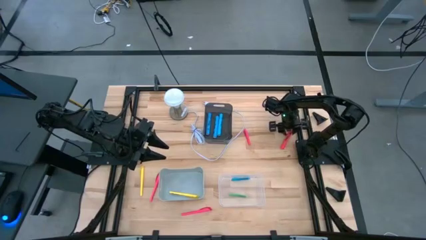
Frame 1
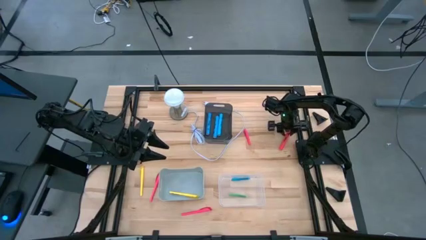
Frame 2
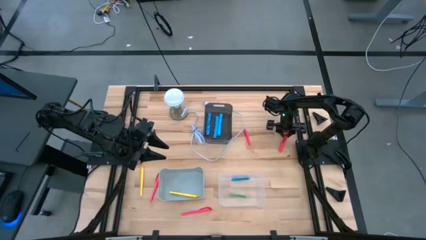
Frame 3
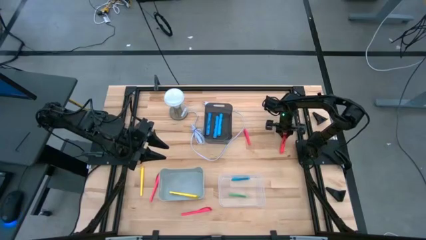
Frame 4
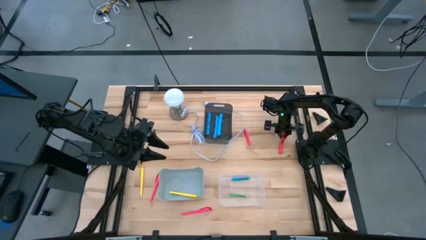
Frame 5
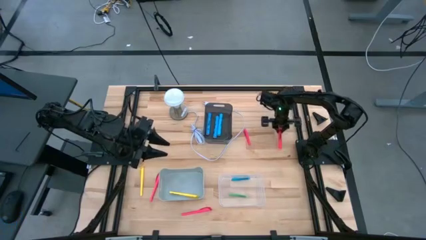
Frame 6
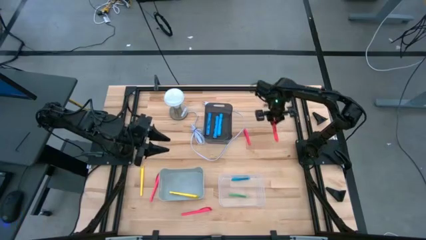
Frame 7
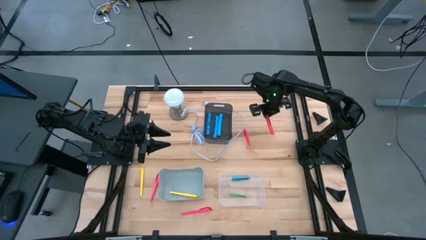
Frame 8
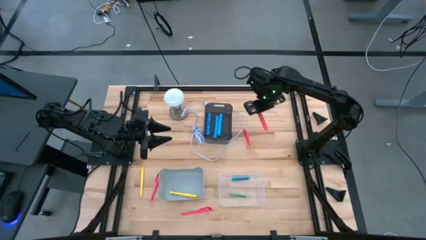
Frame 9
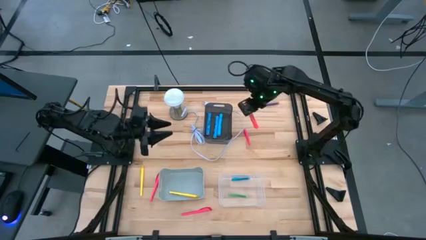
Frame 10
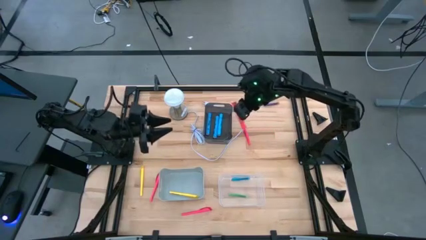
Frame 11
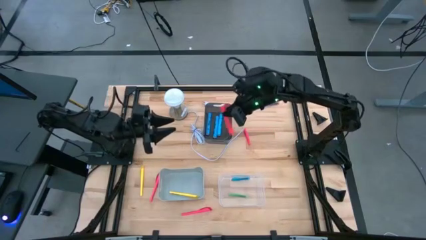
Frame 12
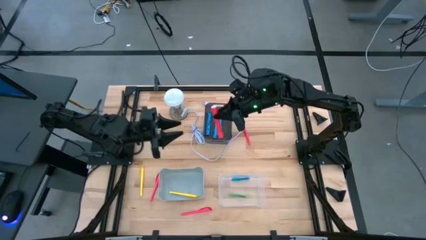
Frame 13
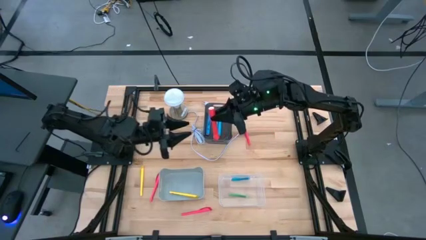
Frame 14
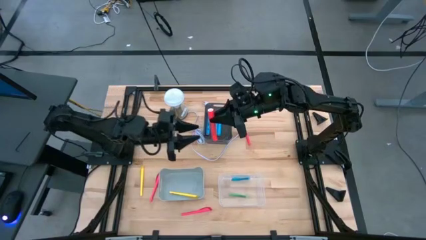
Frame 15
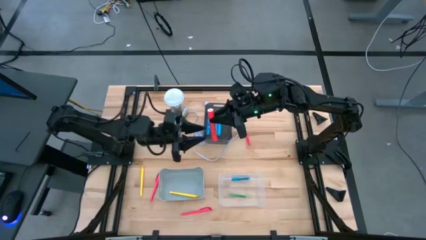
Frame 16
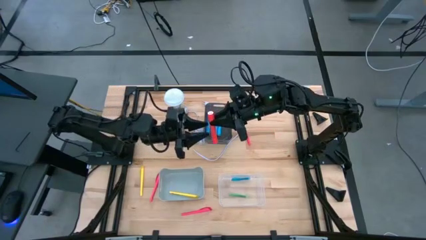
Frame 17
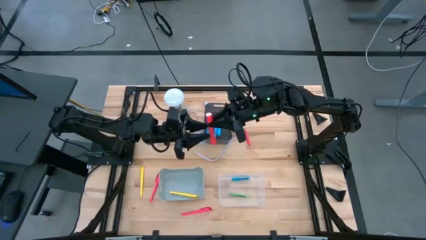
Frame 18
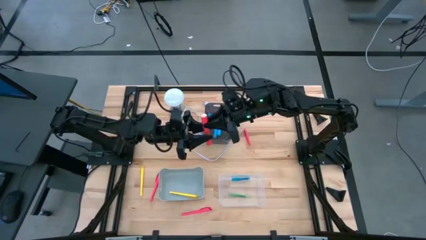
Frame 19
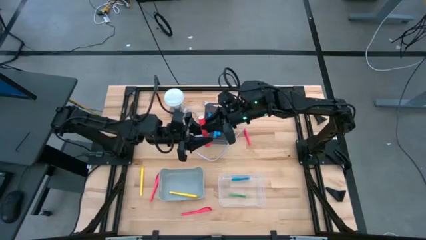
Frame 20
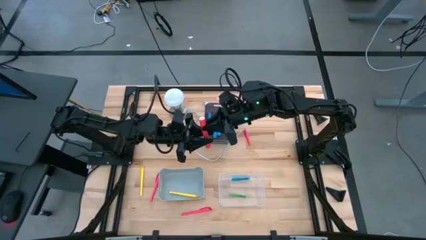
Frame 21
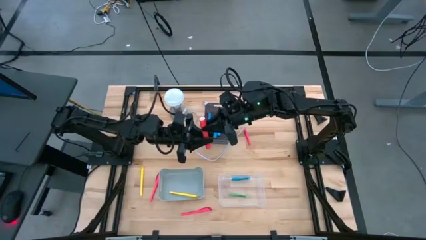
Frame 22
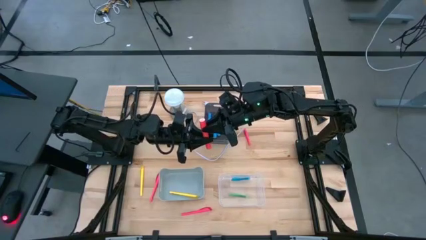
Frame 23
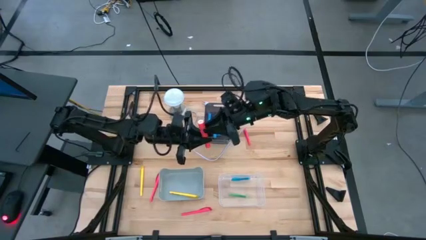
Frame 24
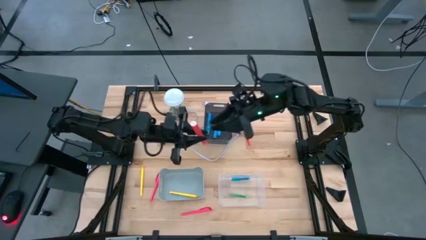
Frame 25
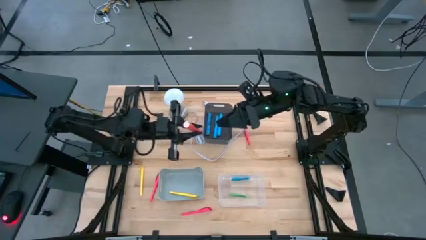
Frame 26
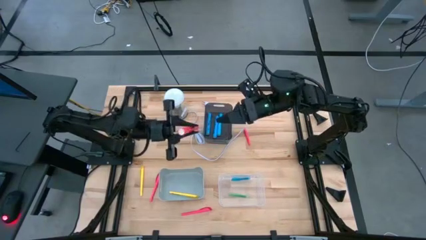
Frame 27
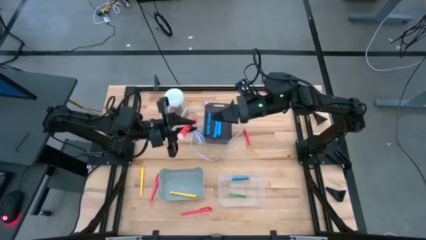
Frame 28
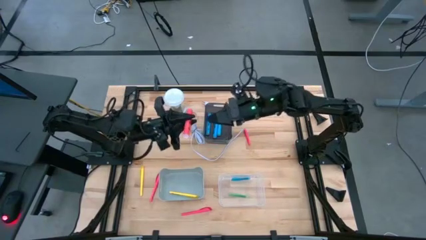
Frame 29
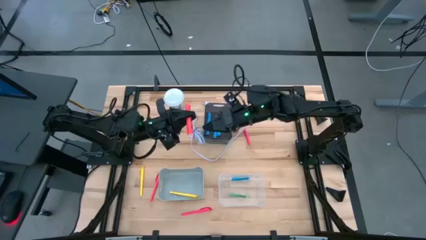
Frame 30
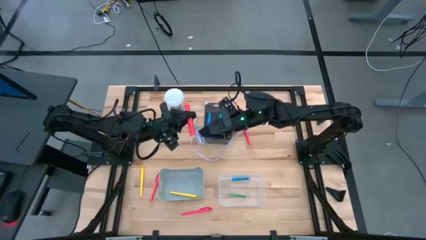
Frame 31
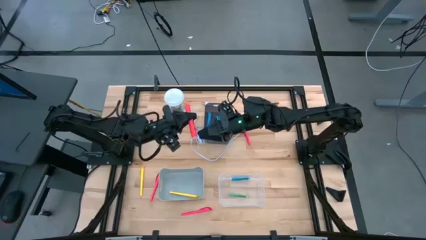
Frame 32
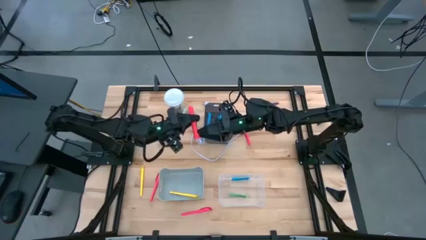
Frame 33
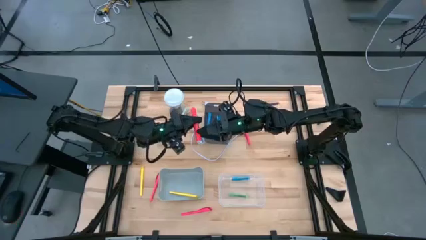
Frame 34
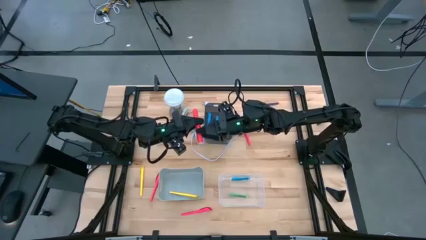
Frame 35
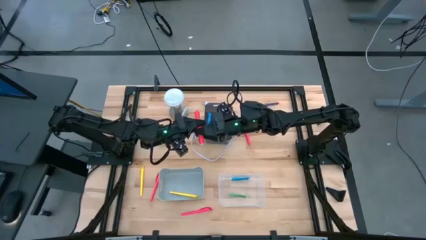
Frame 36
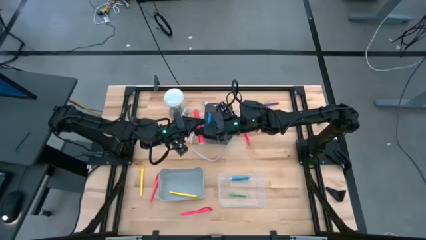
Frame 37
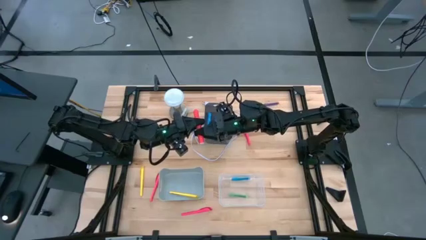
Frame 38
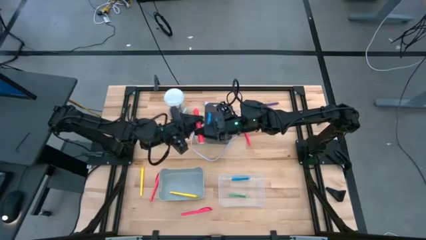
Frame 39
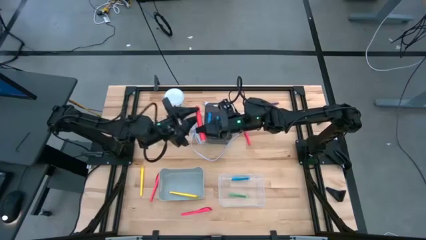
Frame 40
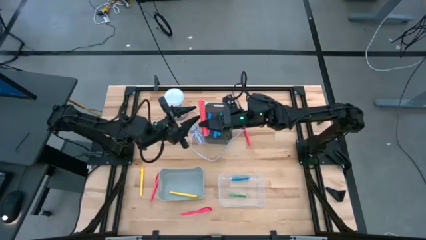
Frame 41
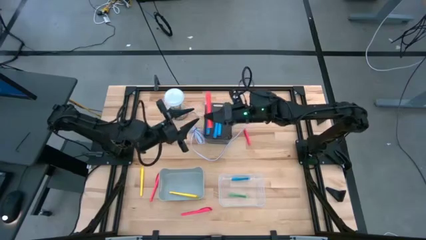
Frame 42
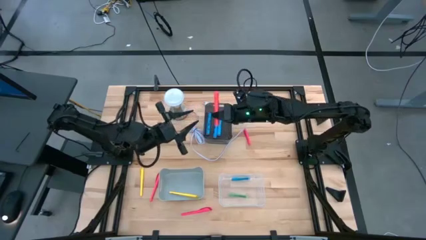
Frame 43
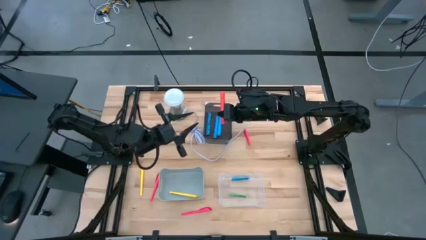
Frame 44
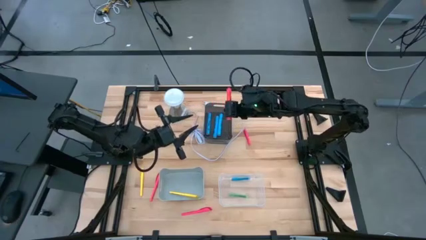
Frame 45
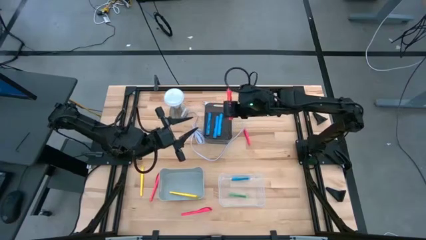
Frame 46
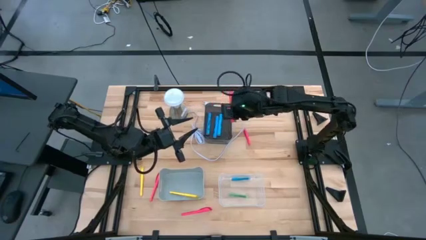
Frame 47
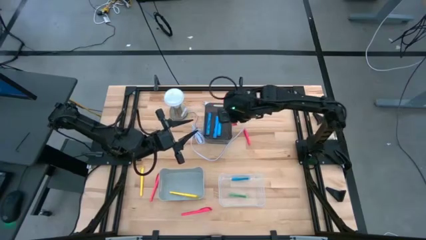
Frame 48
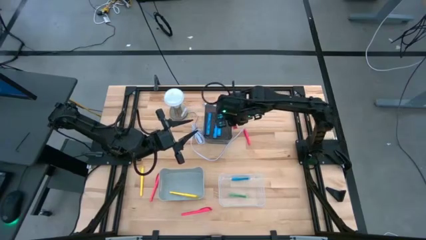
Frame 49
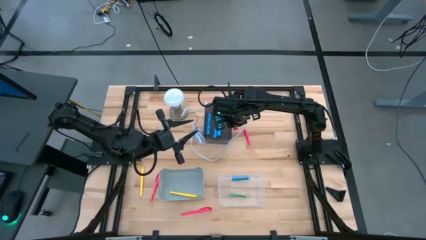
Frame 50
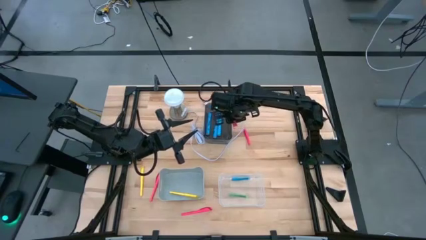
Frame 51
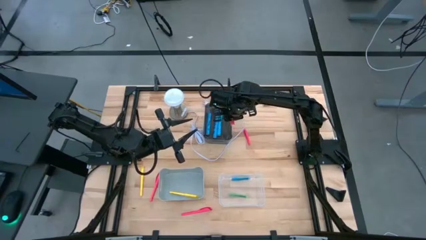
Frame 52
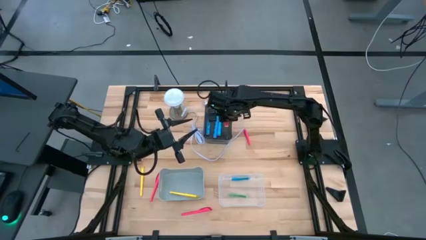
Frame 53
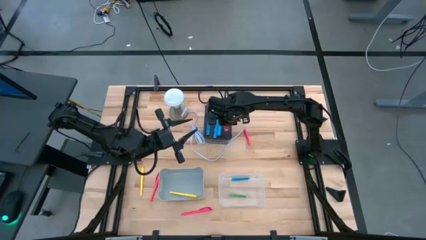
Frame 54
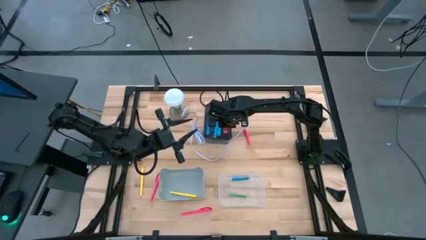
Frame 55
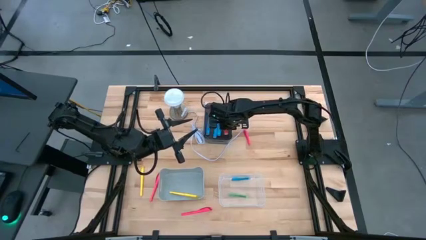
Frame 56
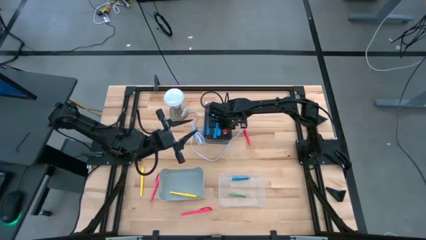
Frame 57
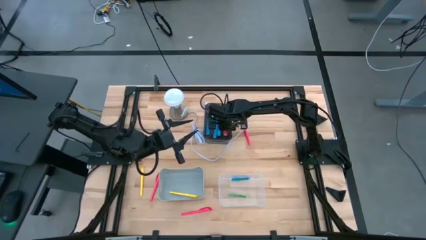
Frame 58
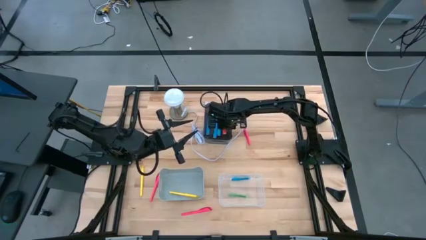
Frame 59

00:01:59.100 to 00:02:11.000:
Task: Pick & Place Markers
Put the orange highlighter pen into the black bin

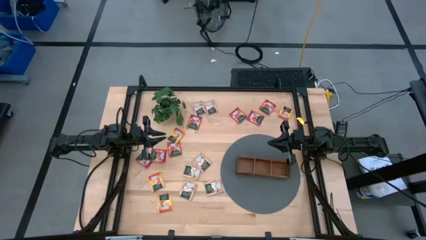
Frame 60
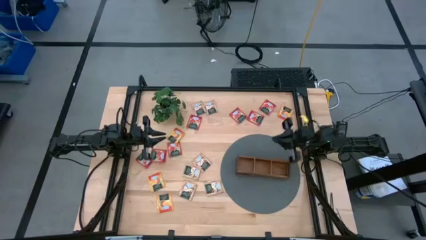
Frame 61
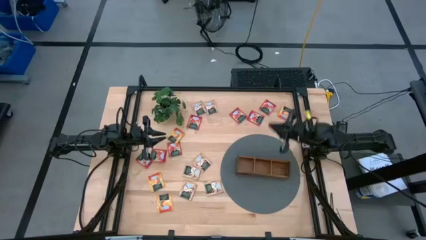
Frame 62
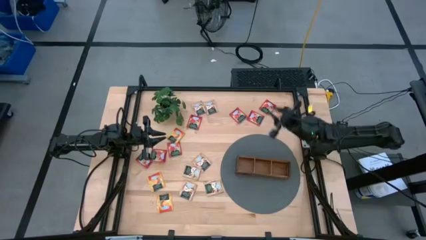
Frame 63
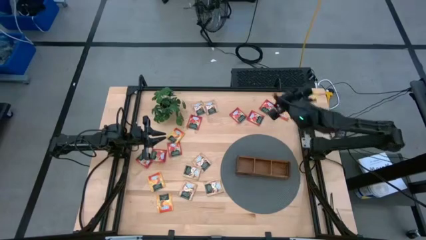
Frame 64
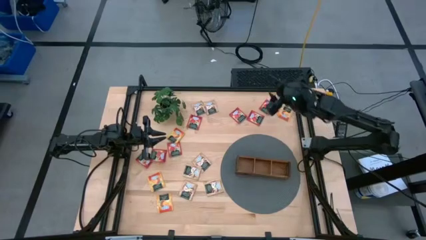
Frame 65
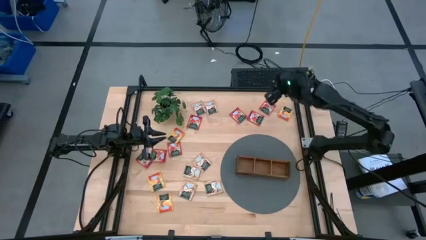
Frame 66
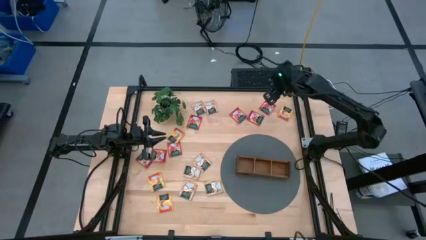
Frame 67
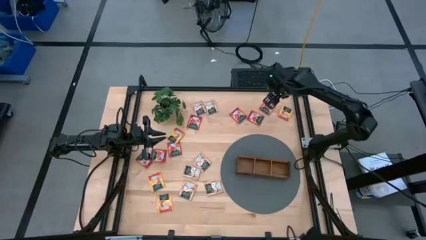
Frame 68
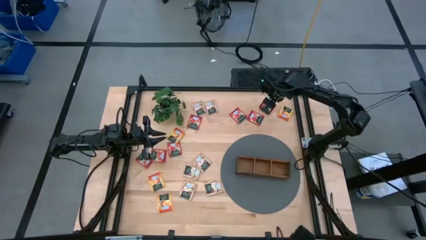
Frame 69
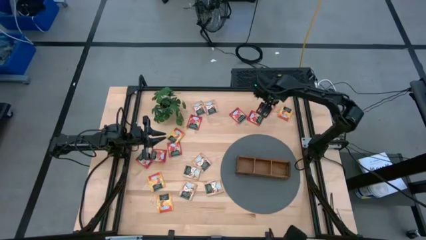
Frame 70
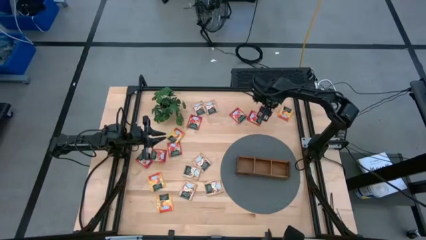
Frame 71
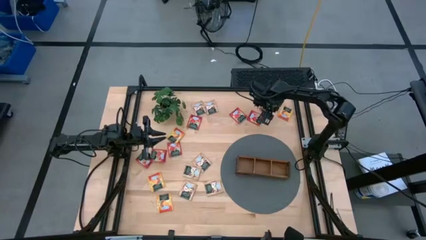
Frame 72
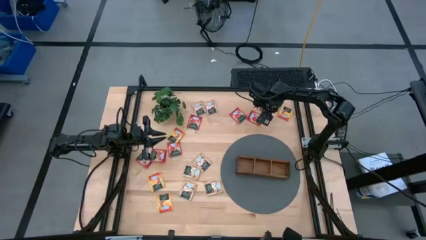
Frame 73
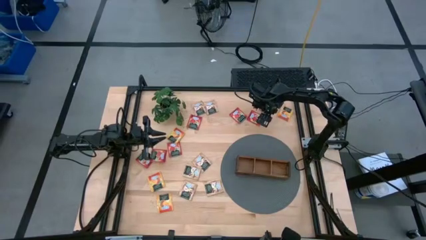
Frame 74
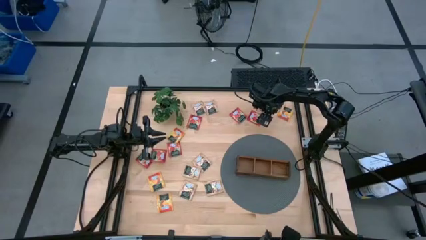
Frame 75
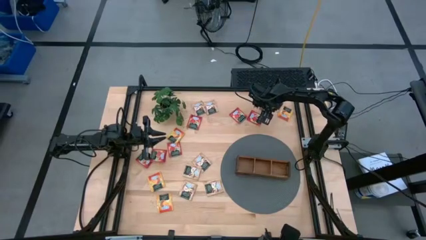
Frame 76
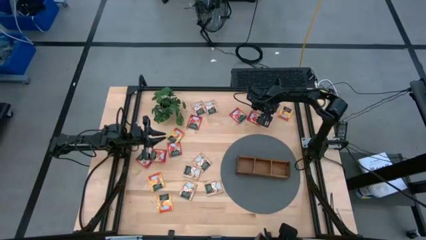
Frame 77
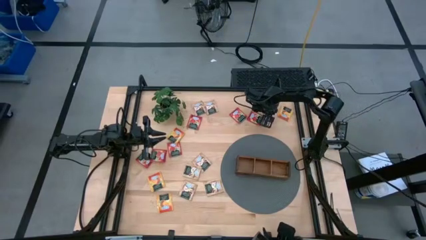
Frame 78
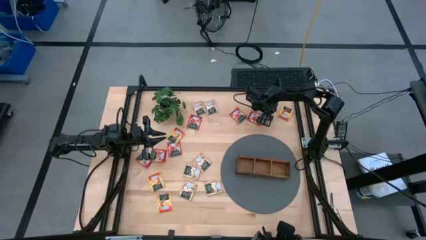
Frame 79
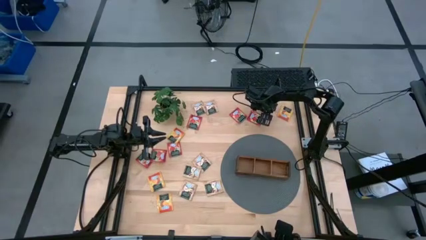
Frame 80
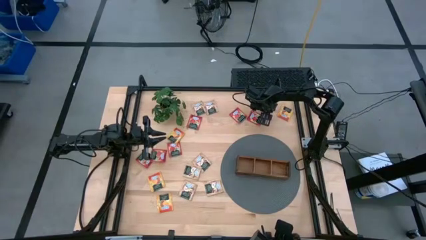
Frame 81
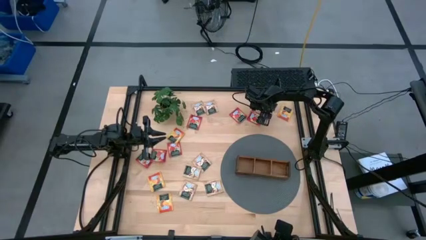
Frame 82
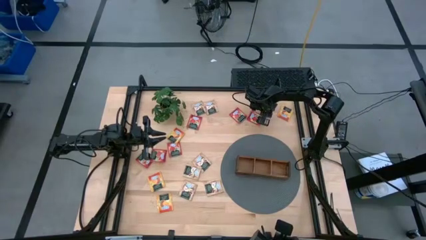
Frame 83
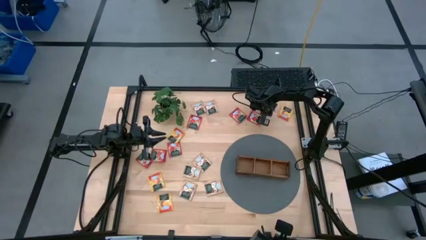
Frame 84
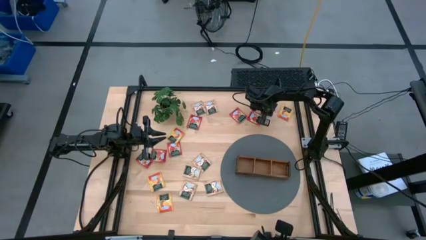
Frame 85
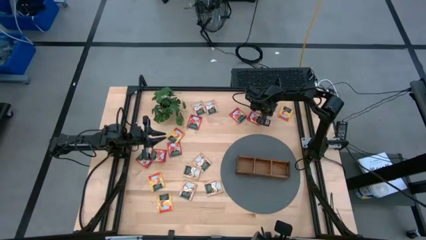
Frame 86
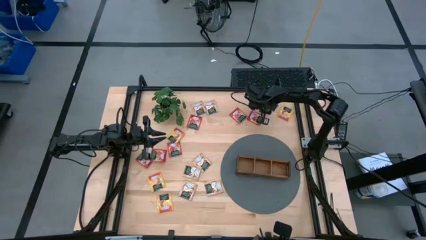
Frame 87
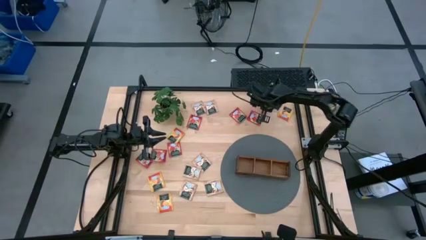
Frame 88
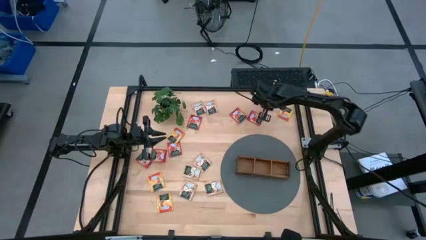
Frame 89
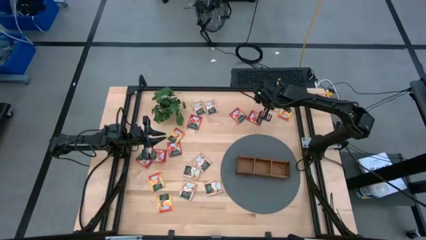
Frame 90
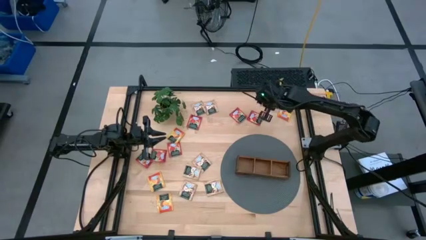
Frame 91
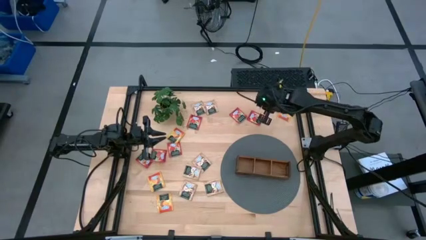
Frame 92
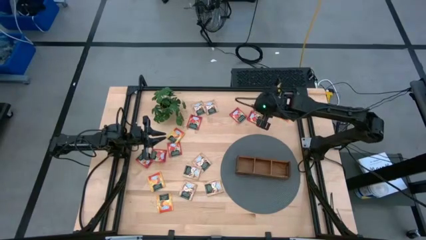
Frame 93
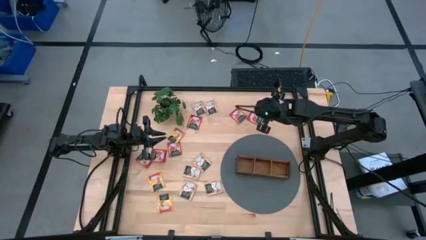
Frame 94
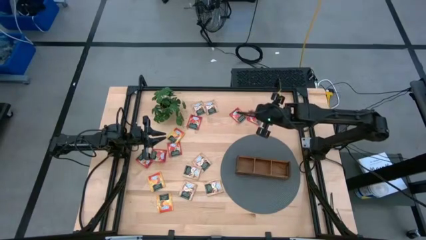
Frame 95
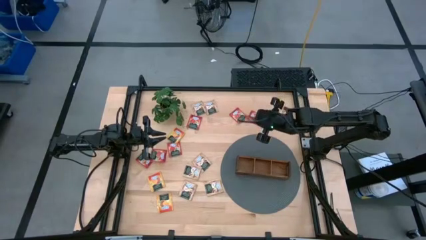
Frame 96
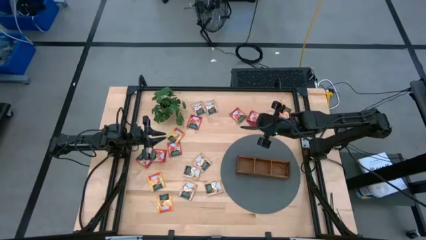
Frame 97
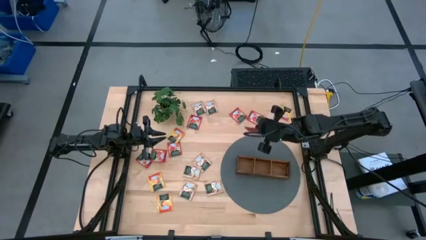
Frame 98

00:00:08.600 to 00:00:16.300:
Task: Pick & Place Tea
Put the red tea bag into the left section of the wooden organizer
